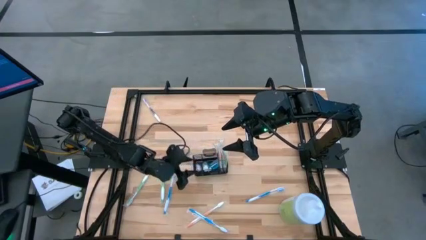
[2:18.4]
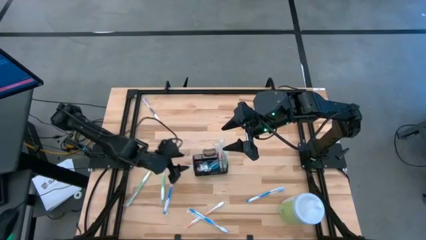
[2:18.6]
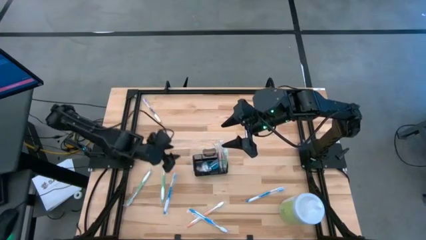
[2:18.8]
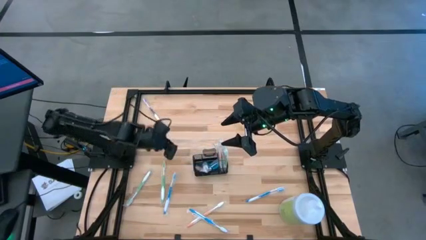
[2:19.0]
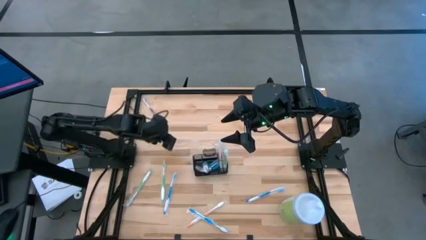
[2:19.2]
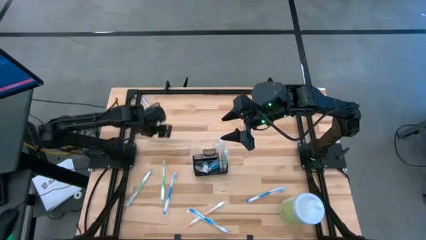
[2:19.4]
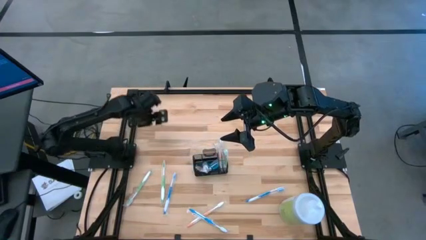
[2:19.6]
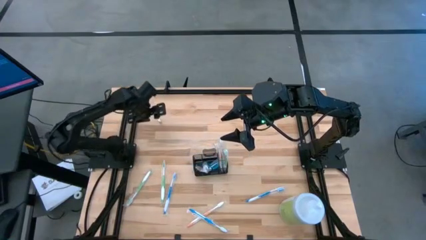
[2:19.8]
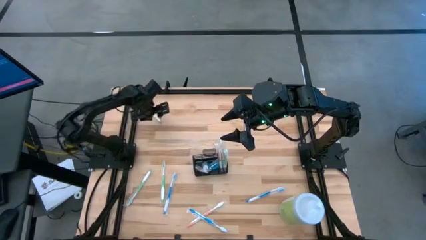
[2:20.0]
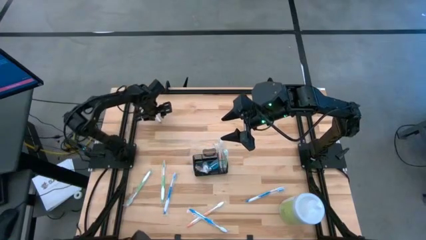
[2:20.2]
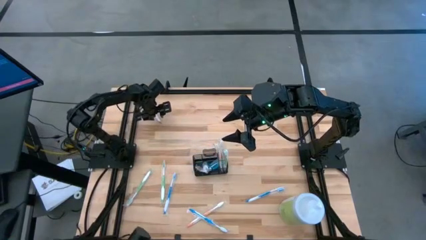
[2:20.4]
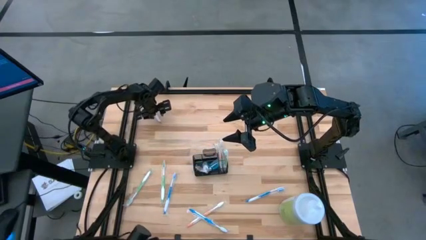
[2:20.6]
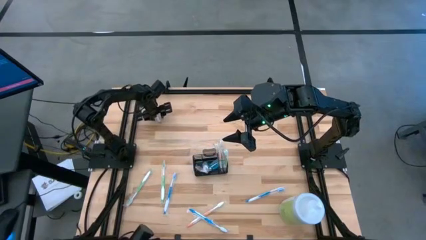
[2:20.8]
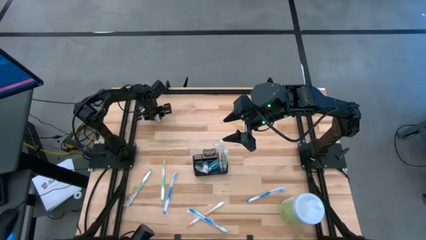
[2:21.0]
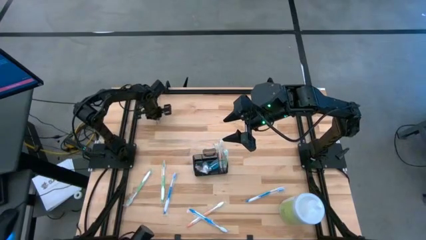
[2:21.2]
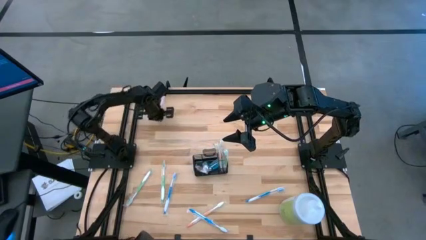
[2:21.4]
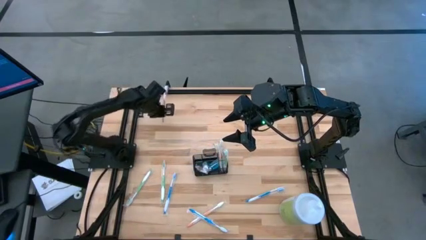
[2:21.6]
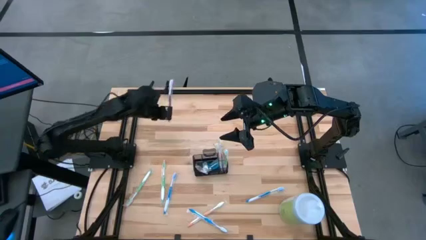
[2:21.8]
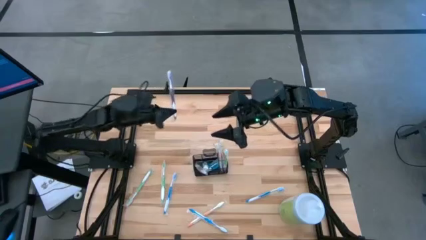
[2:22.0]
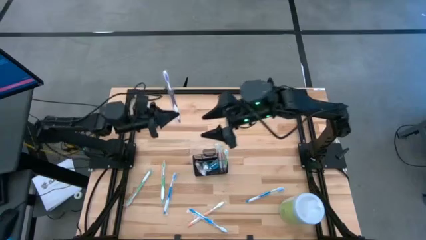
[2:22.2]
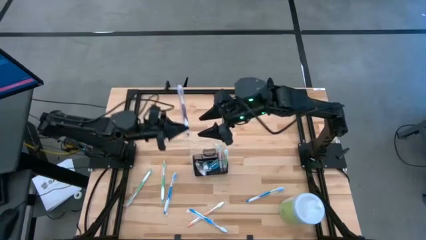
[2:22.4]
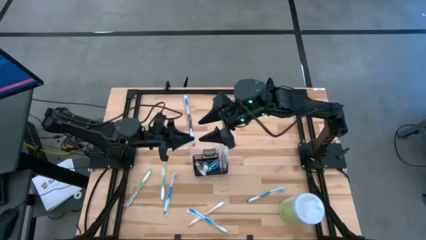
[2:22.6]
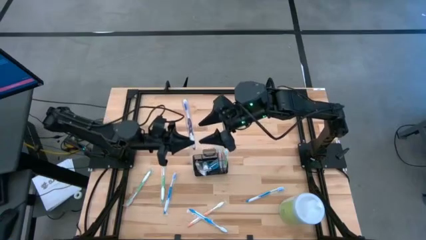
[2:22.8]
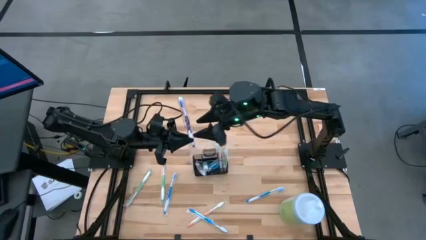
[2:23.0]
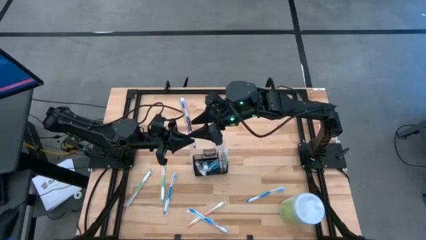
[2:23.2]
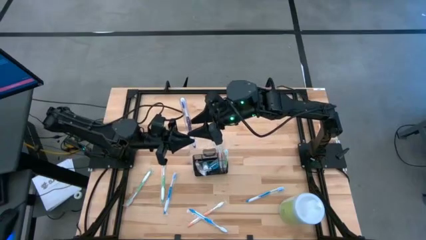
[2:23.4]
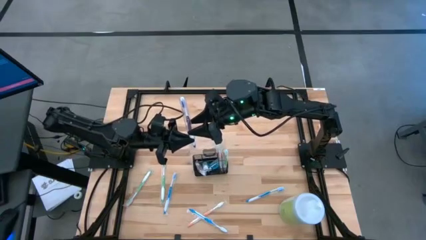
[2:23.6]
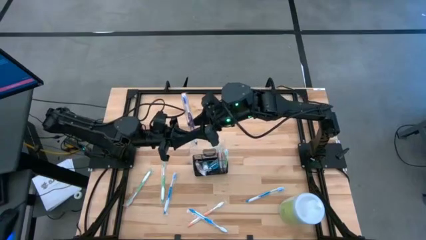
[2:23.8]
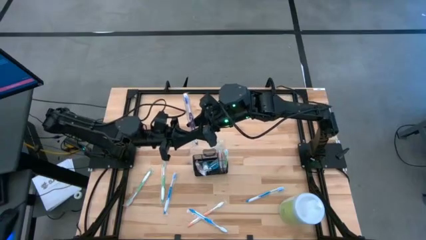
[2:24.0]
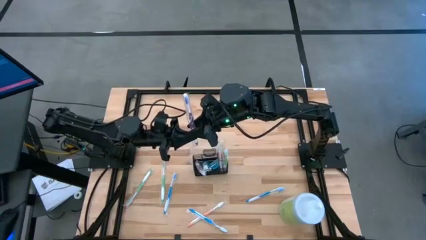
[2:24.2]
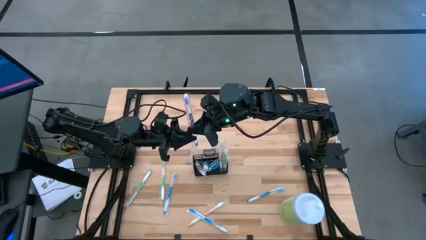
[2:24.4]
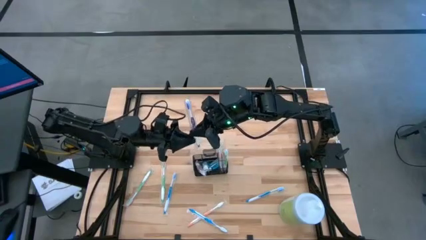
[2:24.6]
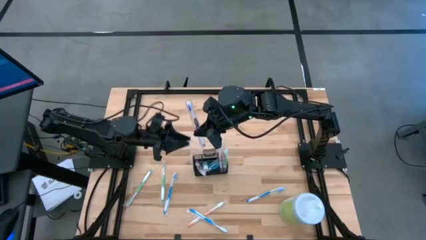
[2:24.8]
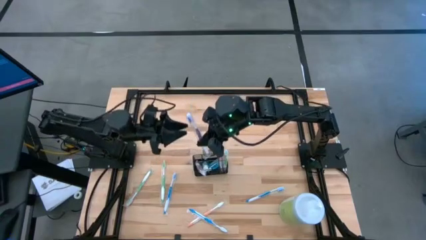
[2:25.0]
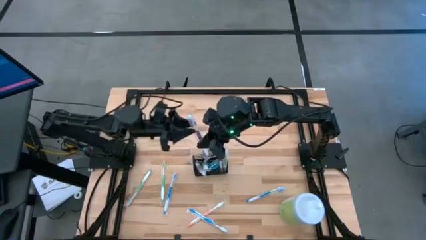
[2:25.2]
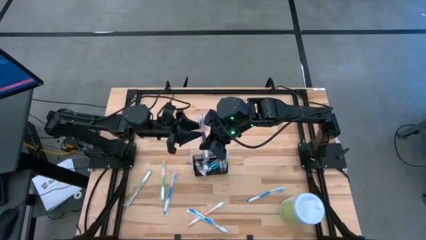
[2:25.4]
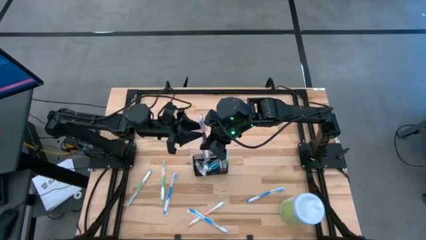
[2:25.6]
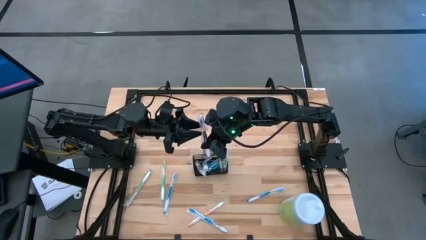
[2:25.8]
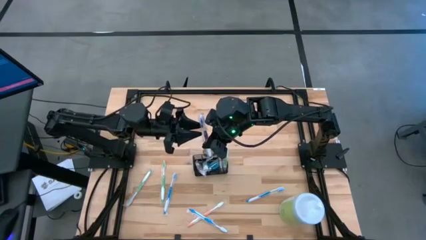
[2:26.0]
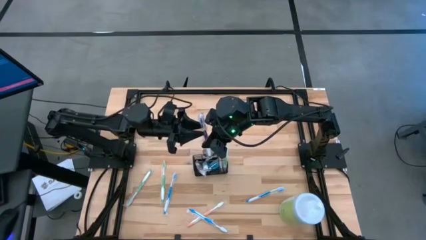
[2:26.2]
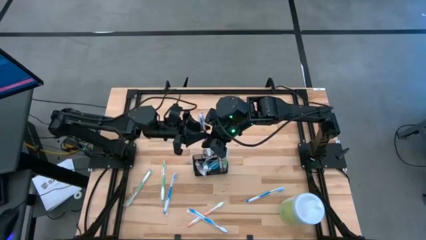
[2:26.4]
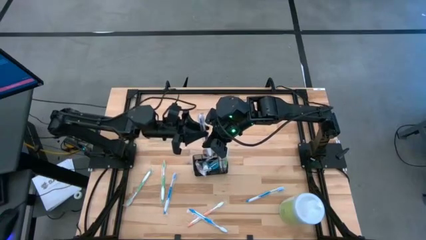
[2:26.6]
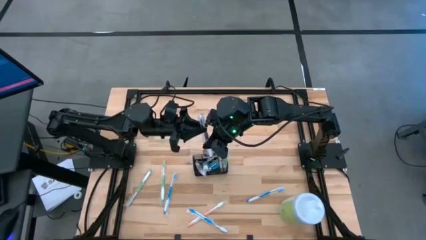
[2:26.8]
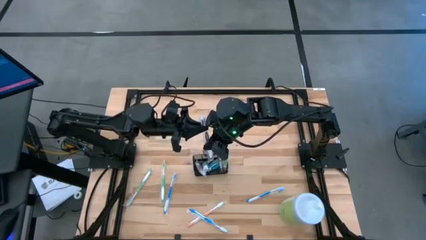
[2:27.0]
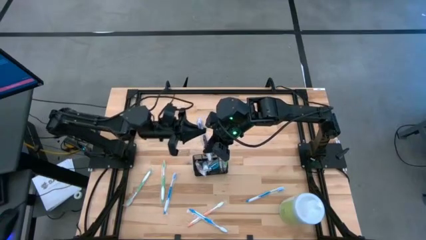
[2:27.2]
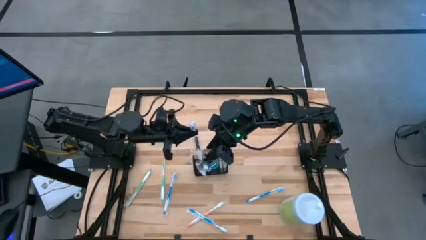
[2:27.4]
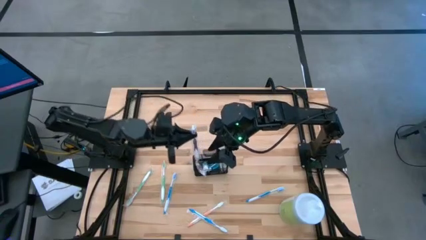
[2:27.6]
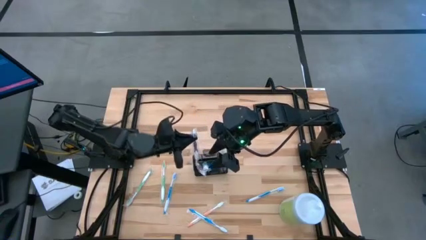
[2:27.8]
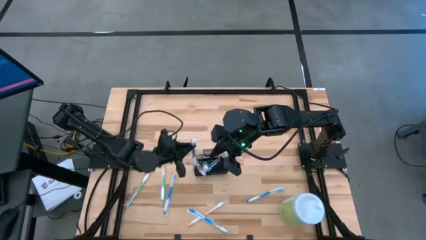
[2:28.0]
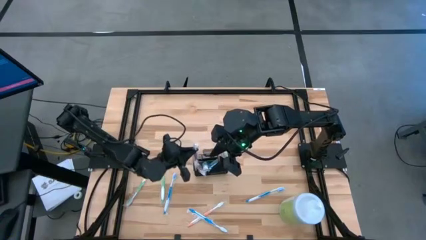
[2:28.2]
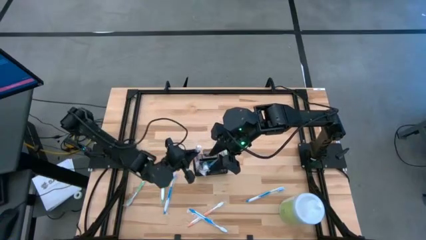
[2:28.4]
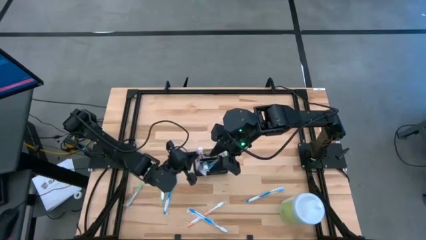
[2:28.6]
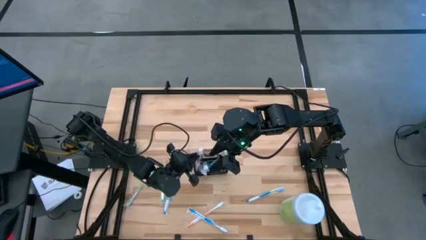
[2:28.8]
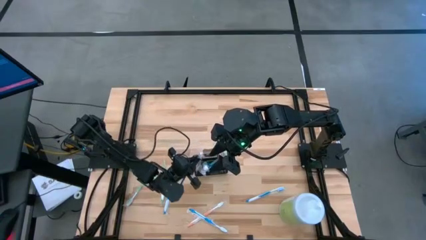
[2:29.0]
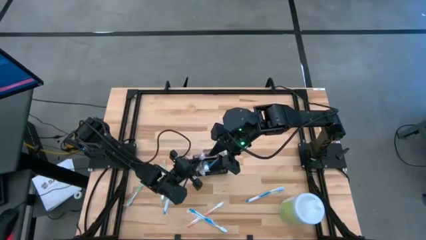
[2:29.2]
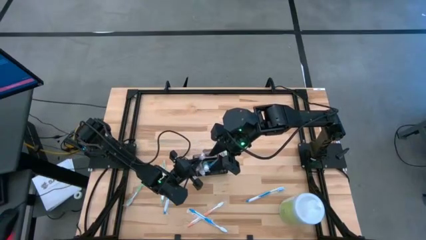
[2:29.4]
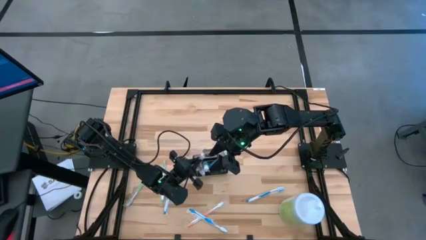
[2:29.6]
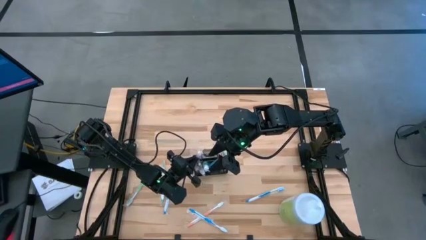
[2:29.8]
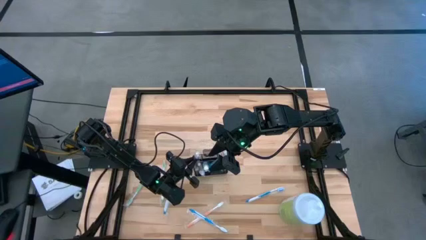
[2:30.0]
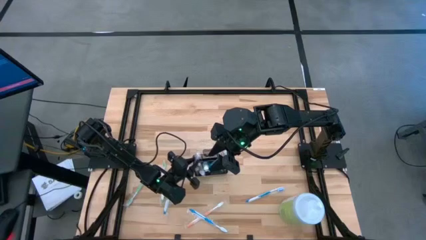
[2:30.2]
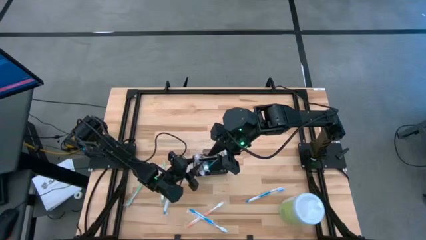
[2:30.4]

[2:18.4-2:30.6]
Task: Pick & Place toothbrushing station
Put the purple toothbrush into the bottom left section of the mesh organizer

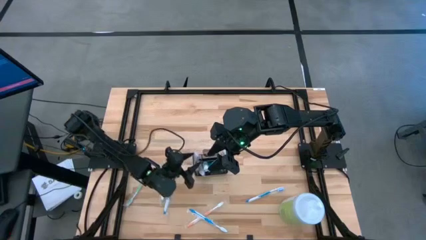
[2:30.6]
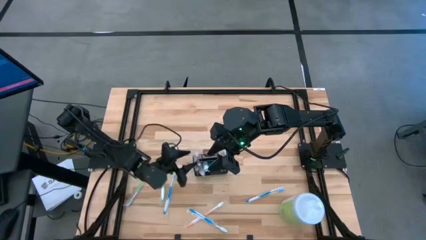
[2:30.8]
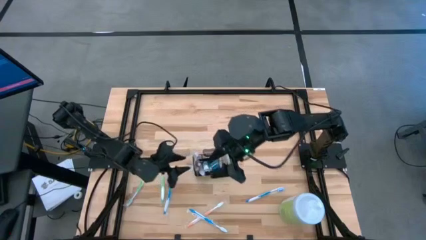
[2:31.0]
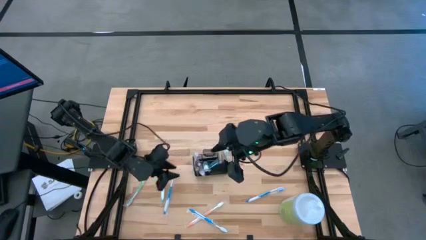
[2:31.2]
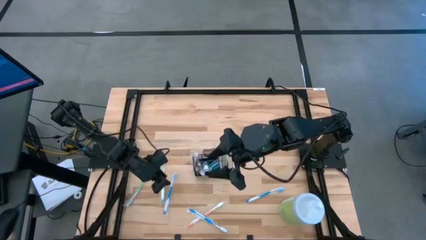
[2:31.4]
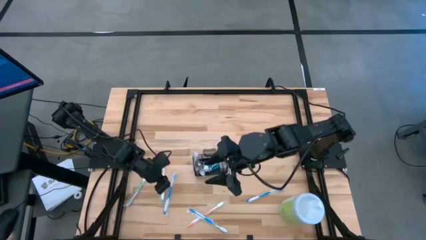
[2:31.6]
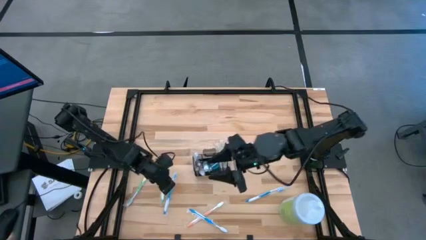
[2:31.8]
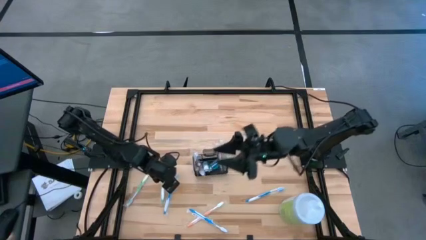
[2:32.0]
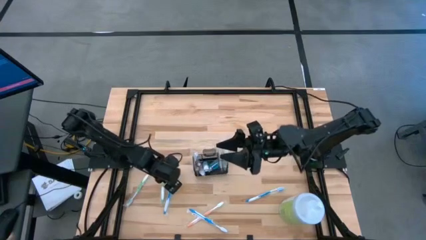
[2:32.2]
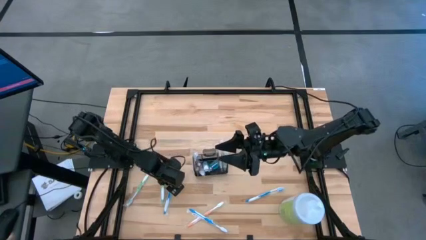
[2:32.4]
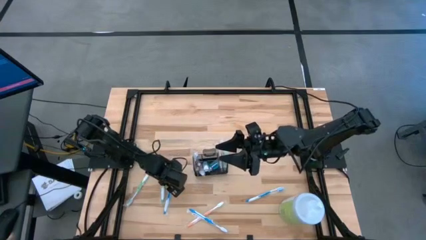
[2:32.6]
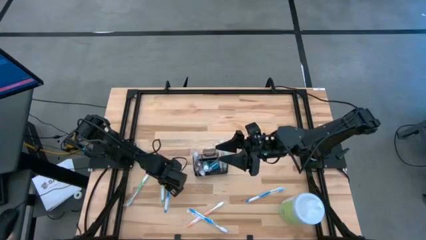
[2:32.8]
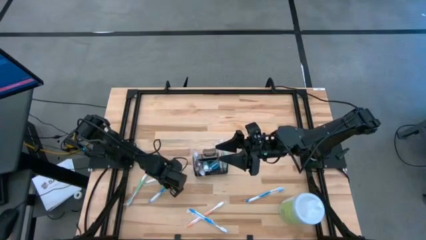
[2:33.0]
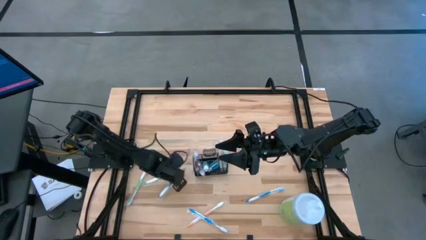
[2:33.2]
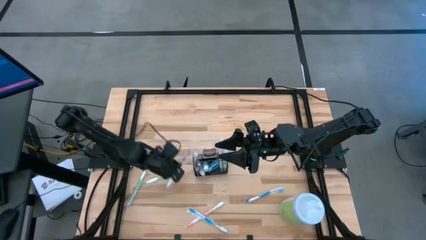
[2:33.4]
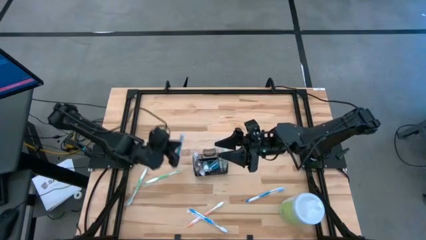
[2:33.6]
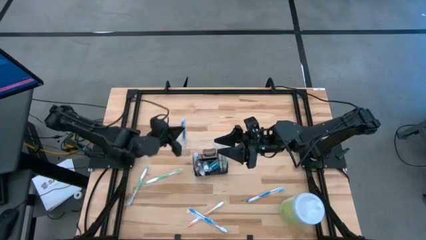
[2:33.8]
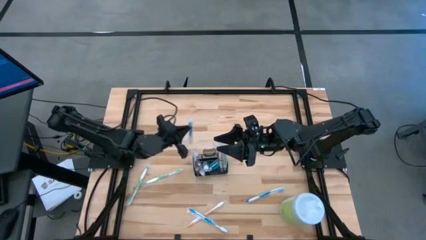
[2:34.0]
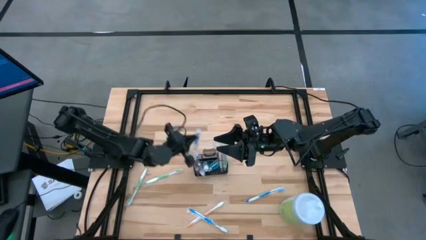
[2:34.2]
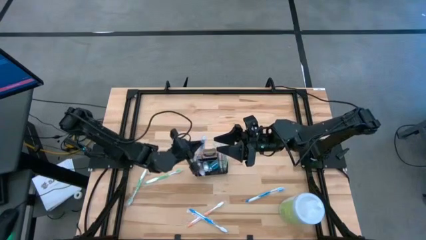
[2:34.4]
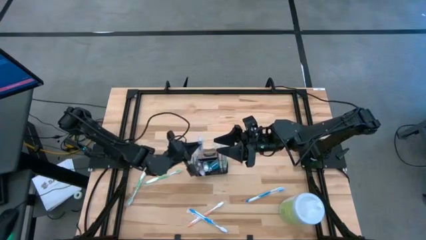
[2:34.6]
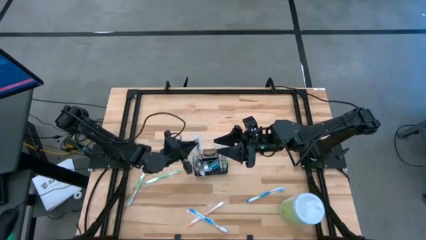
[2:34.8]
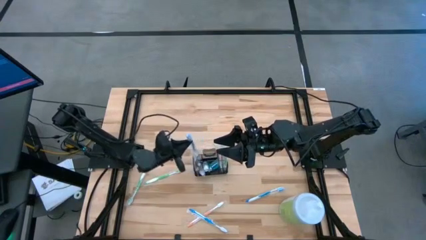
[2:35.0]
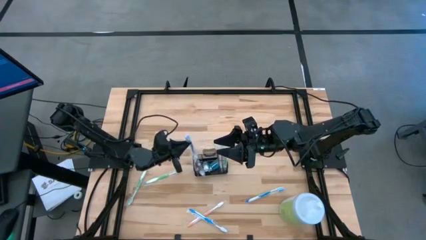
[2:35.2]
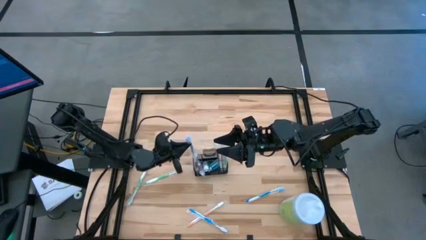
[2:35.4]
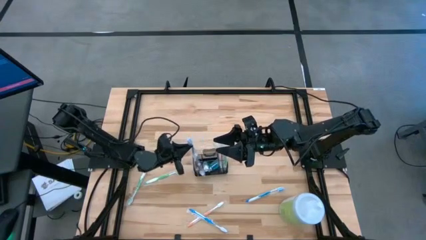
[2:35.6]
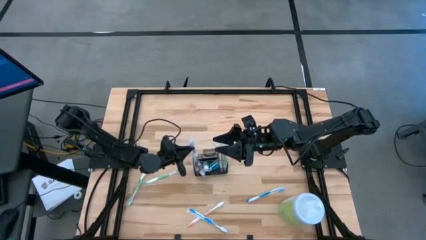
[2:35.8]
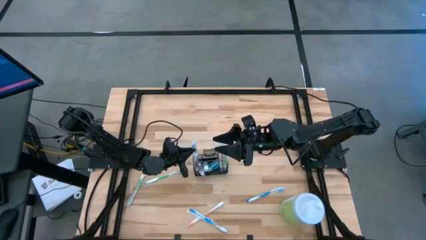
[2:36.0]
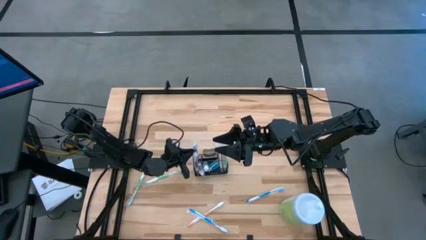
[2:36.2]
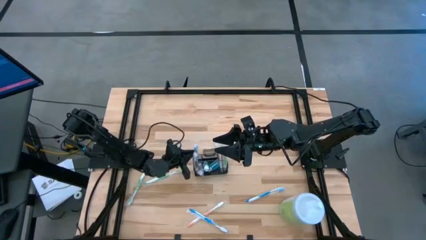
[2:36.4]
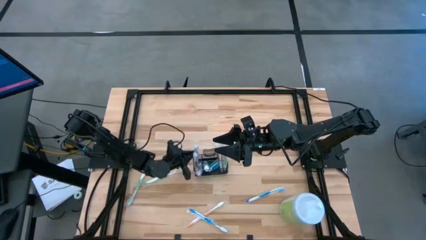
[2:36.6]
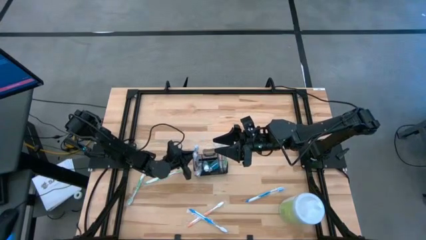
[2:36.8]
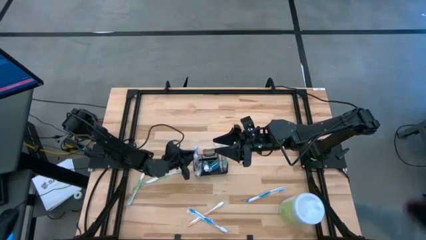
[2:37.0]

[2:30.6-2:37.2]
Put the left blue toothbrush into the top left section of the mesh organizer
